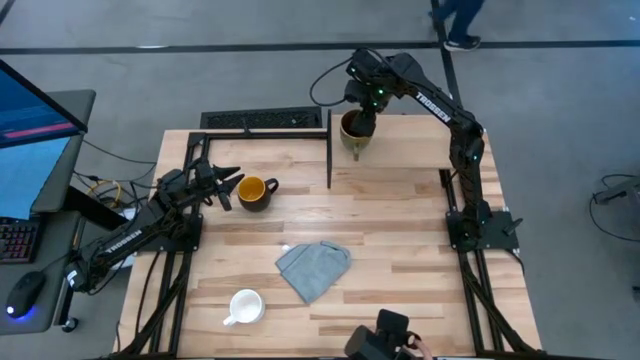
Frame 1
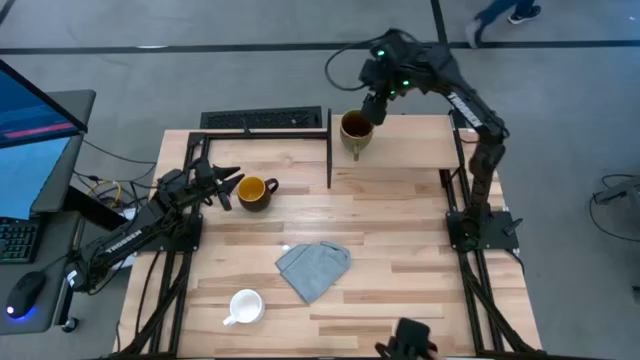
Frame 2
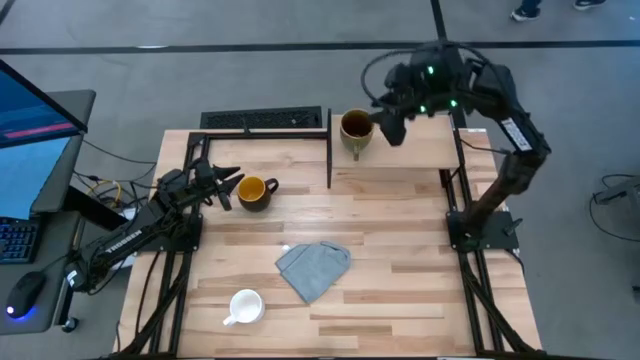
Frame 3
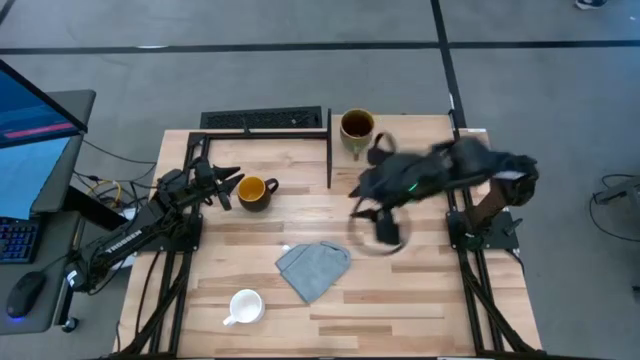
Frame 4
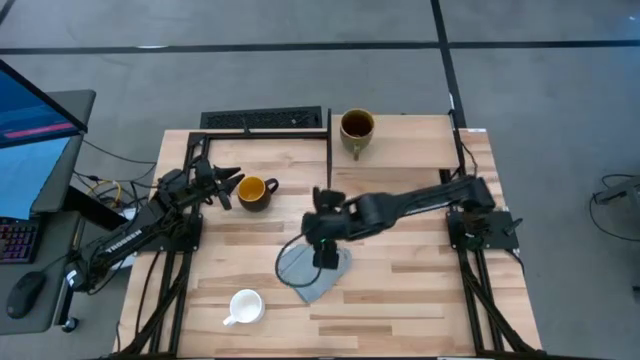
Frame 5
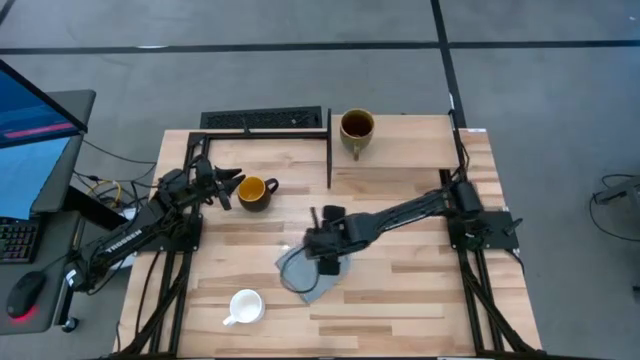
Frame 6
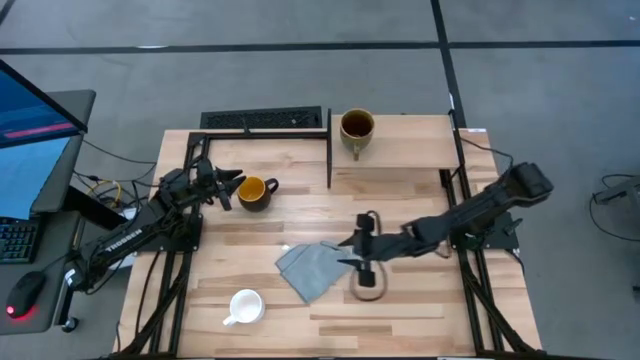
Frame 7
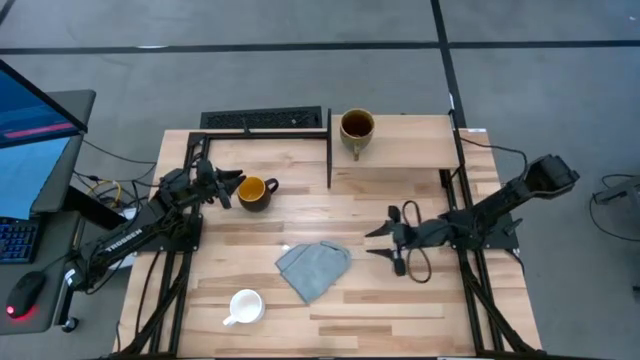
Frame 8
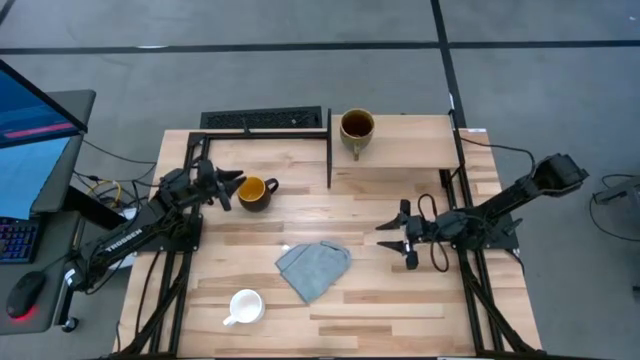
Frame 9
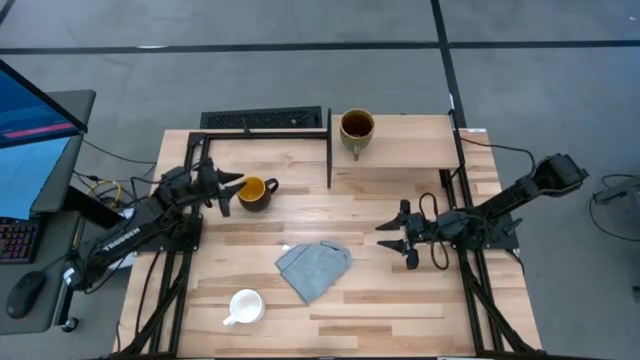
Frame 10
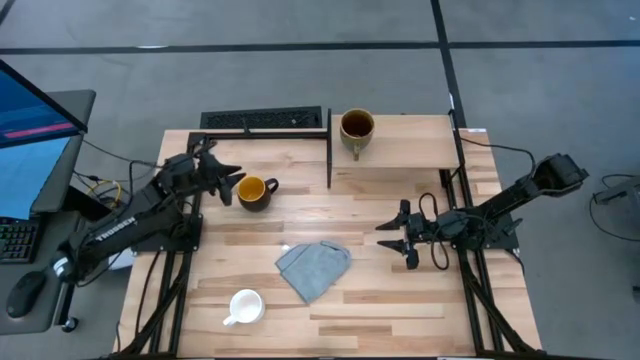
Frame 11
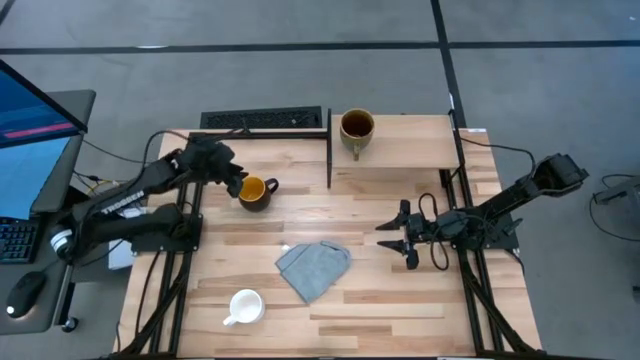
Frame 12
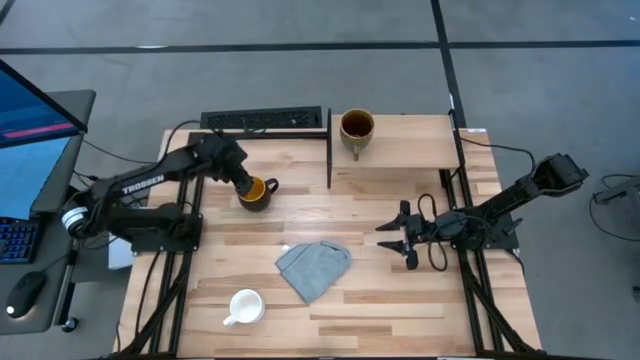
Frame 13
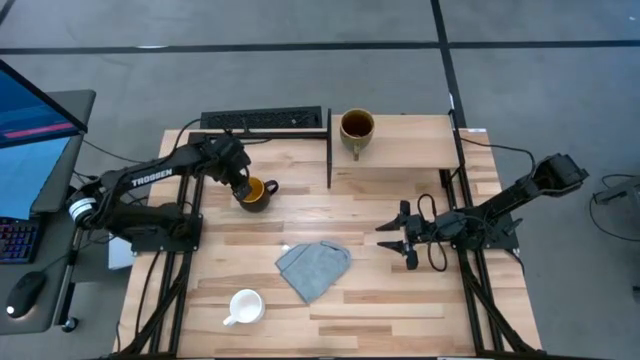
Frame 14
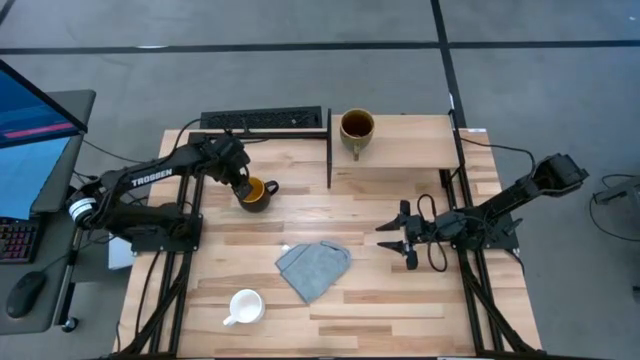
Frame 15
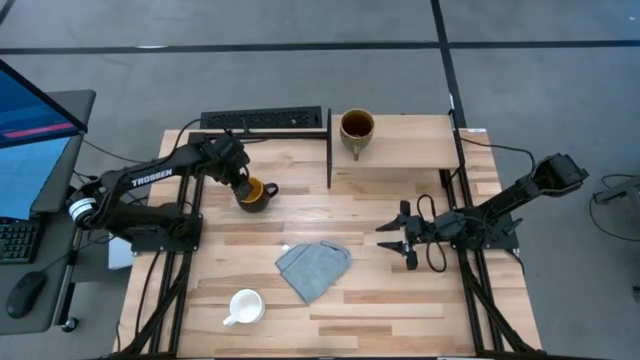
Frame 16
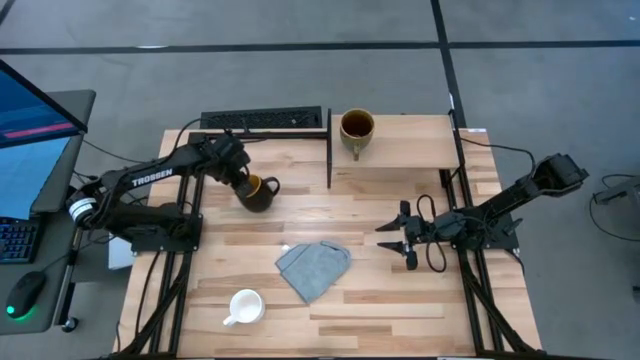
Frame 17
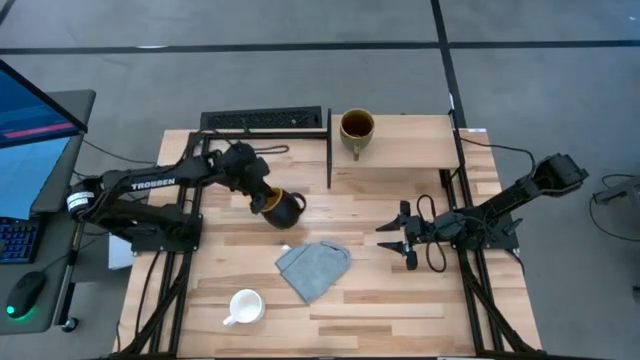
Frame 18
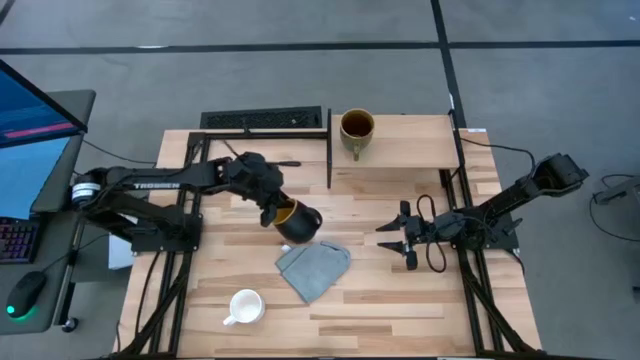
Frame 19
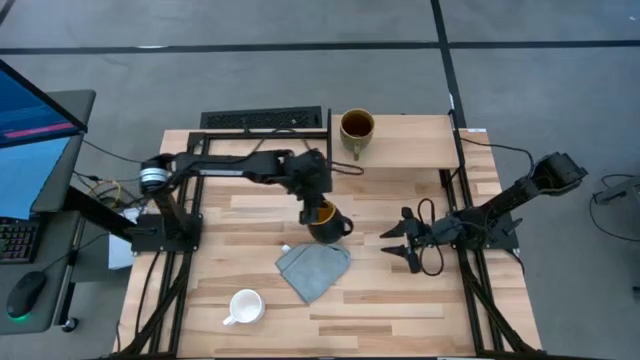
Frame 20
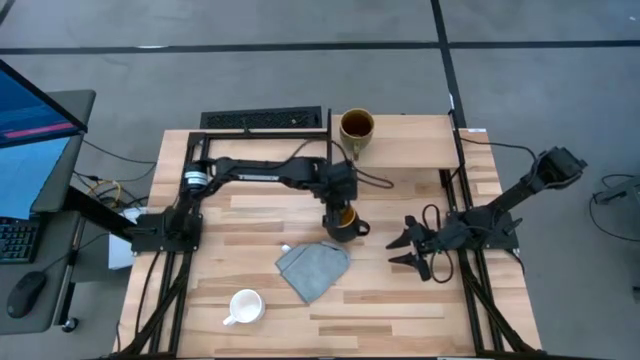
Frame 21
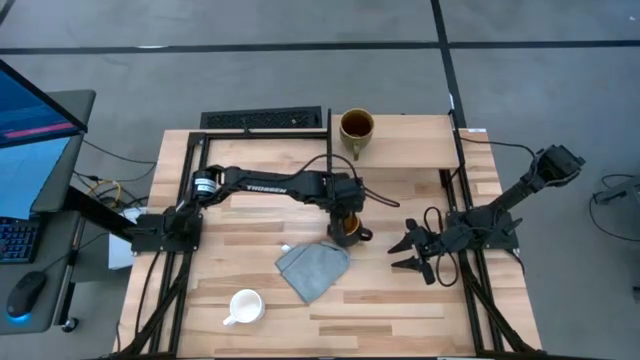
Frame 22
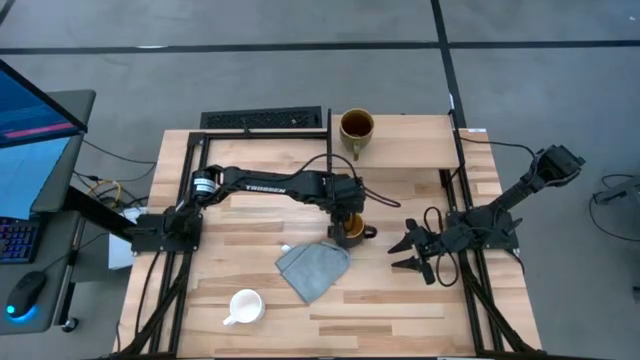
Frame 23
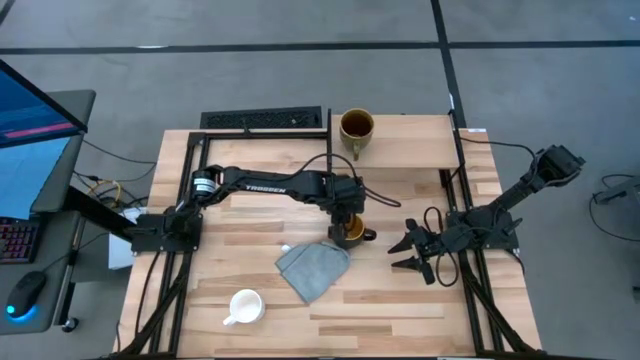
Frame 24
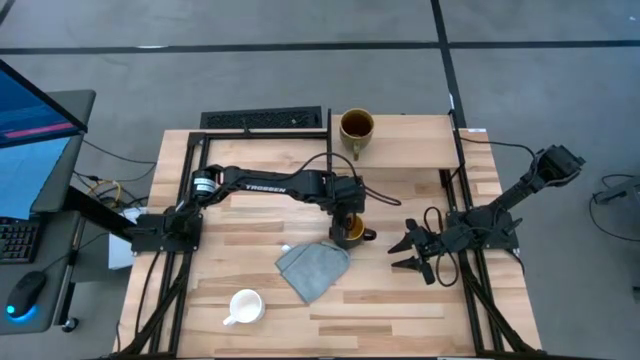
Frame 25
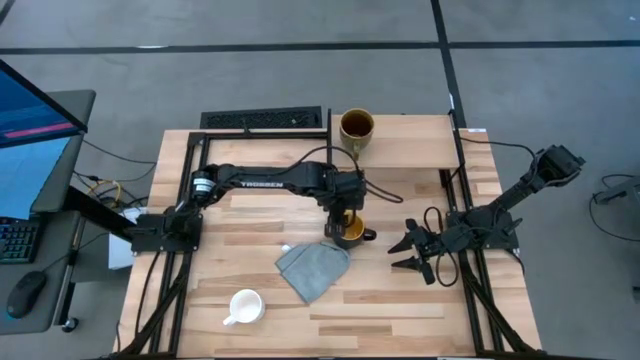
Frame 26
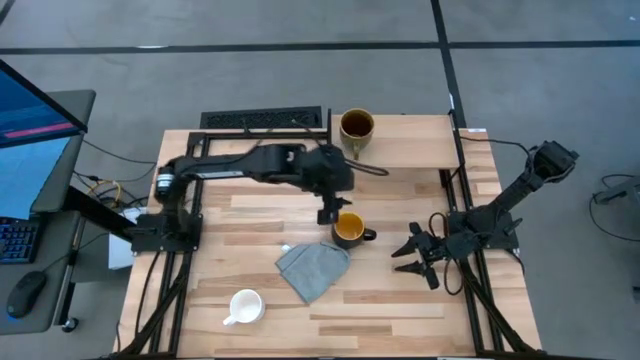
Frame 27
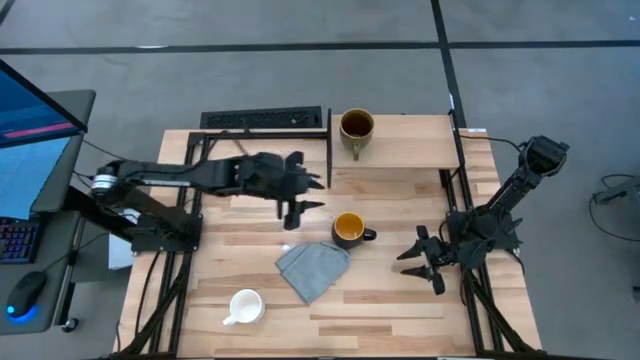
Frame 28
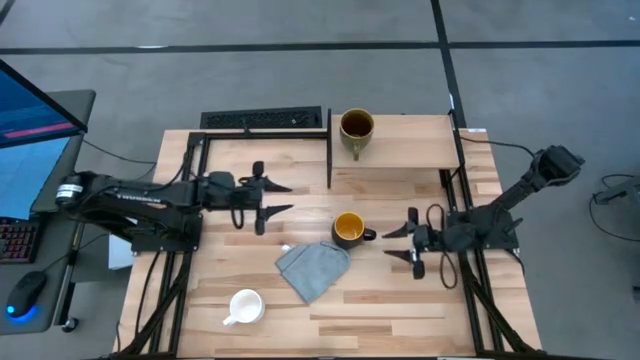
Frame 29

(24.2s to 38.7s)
Task: Stack small to large cups/mugs on shelf
Put the yellow mug on the shelf
